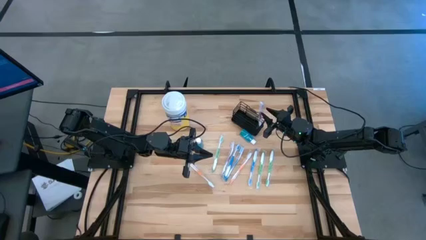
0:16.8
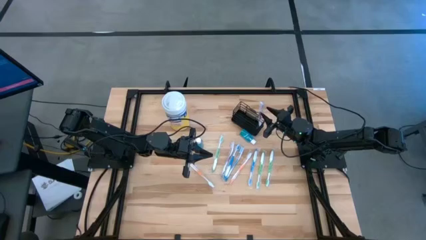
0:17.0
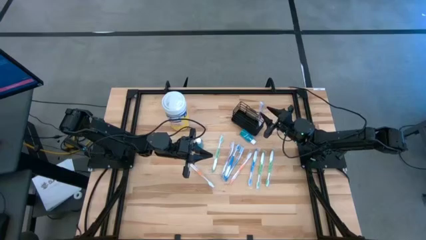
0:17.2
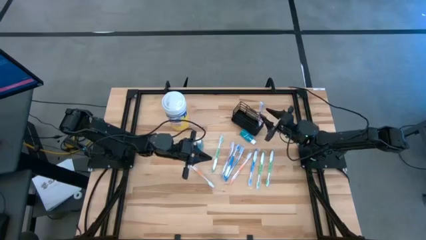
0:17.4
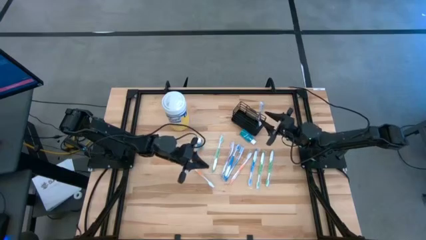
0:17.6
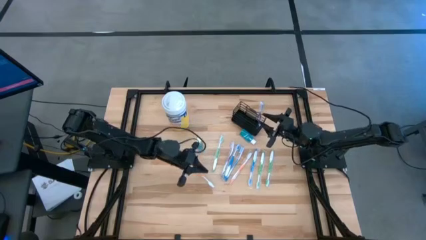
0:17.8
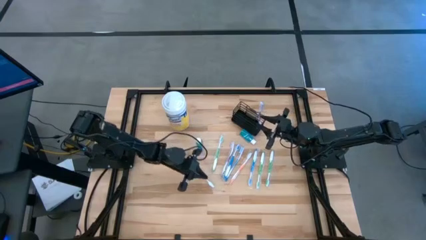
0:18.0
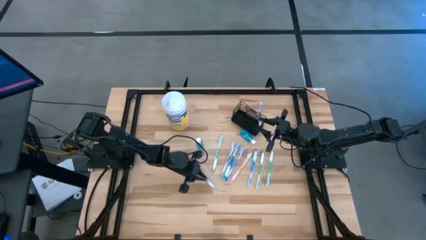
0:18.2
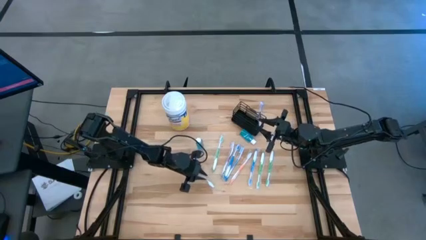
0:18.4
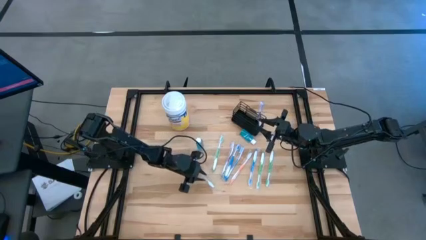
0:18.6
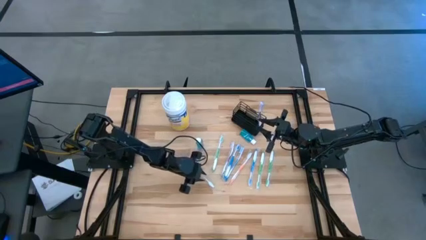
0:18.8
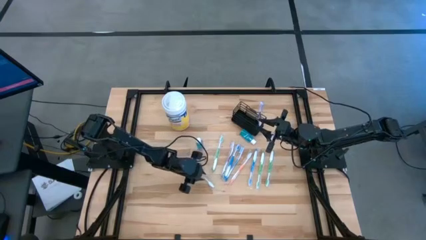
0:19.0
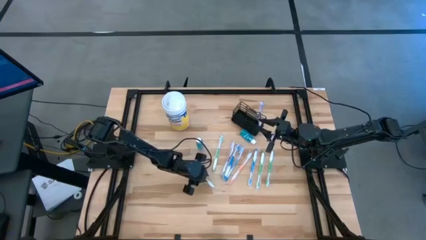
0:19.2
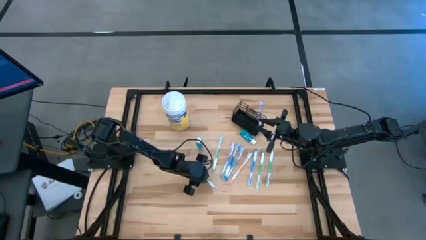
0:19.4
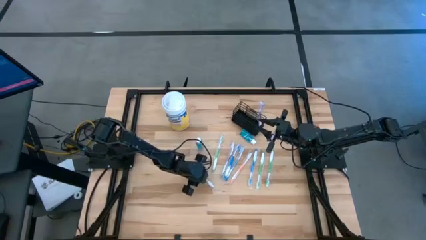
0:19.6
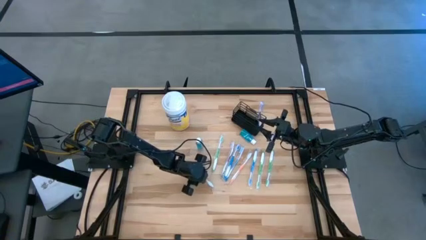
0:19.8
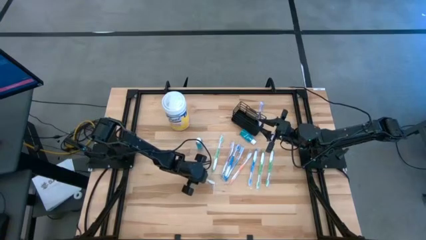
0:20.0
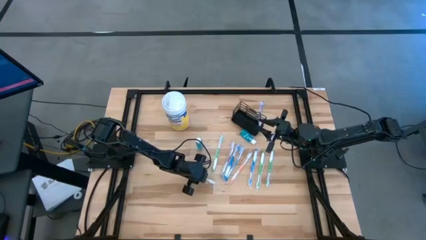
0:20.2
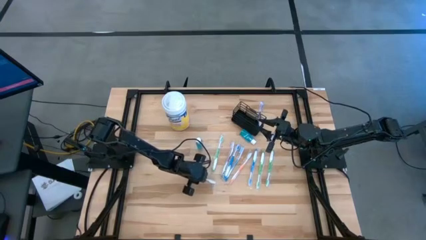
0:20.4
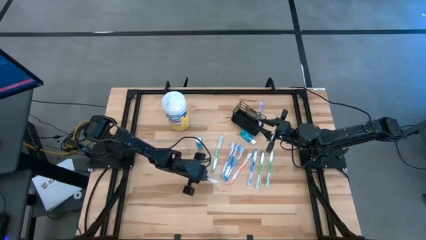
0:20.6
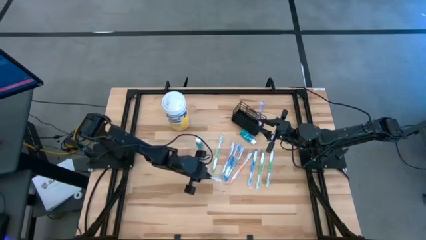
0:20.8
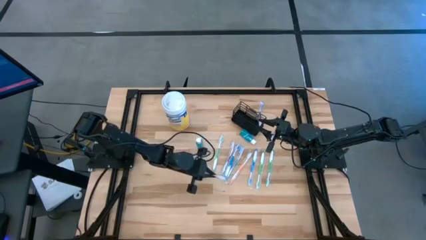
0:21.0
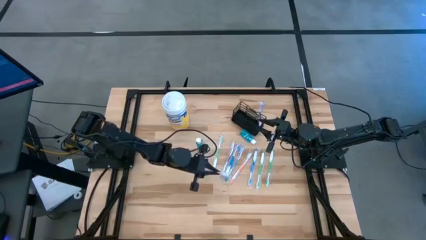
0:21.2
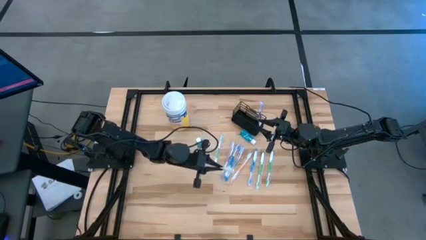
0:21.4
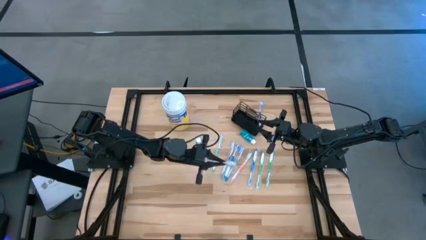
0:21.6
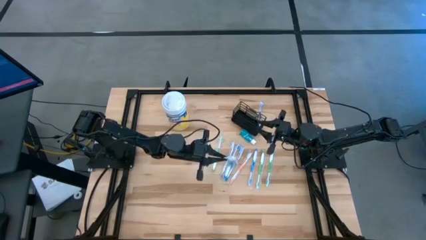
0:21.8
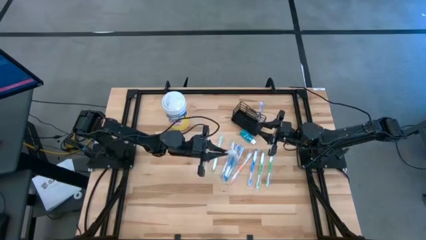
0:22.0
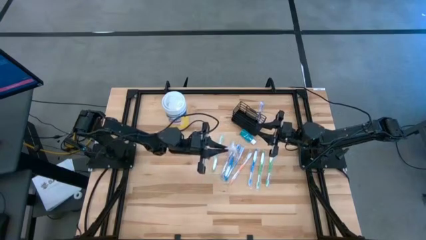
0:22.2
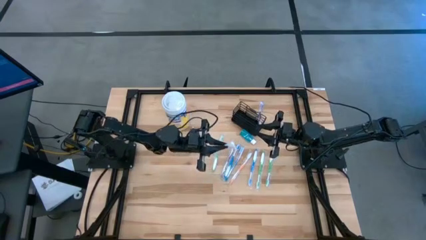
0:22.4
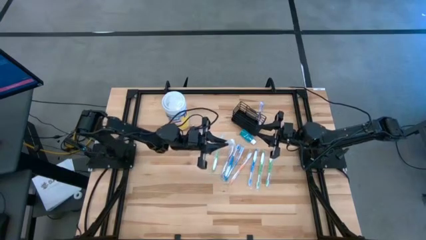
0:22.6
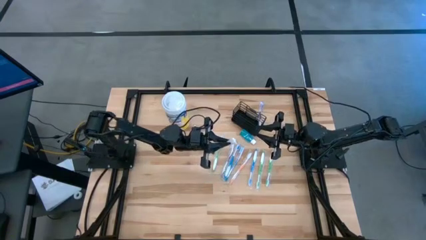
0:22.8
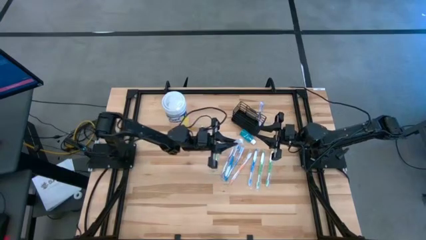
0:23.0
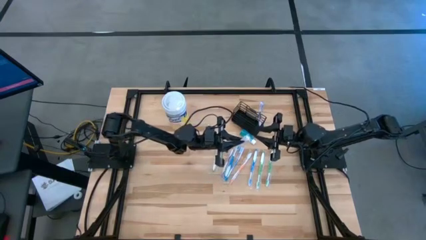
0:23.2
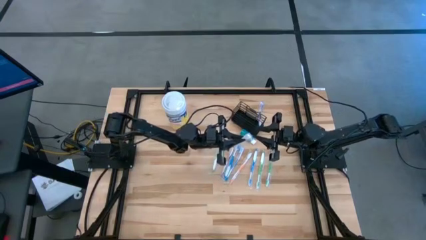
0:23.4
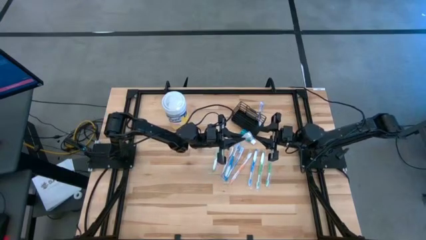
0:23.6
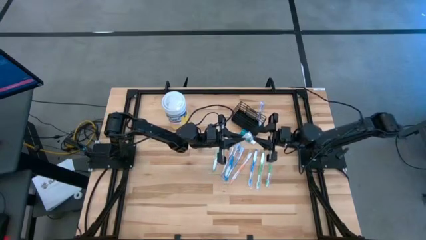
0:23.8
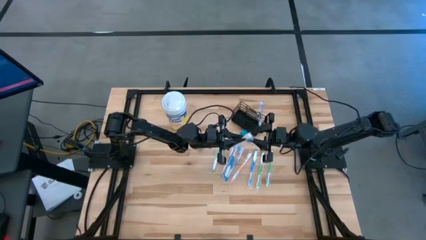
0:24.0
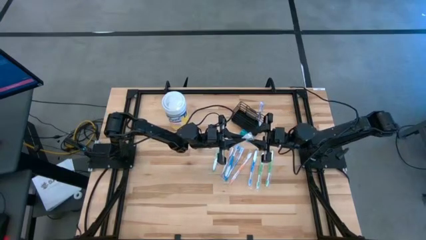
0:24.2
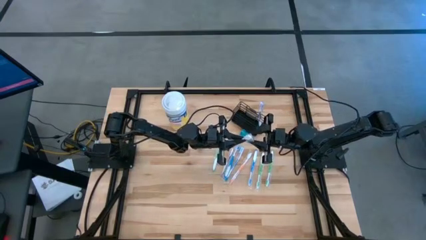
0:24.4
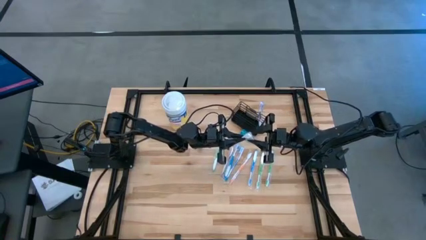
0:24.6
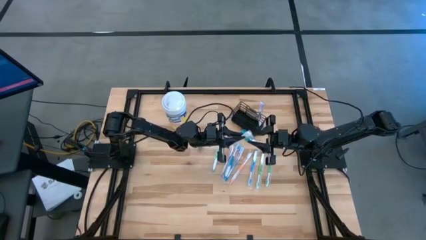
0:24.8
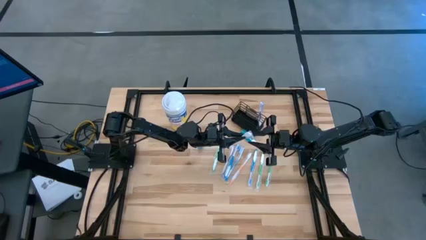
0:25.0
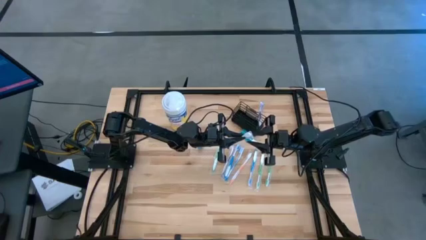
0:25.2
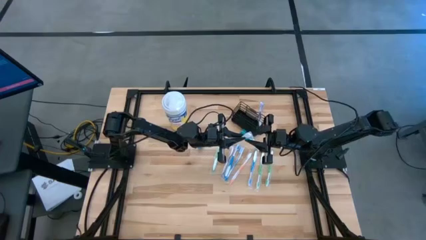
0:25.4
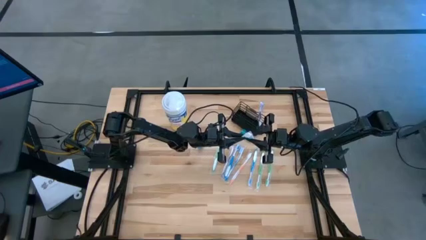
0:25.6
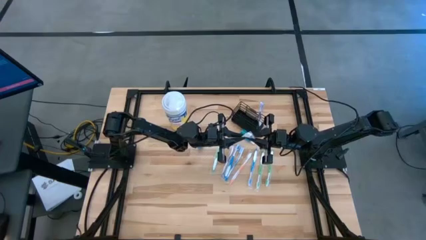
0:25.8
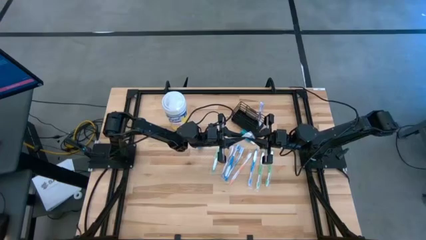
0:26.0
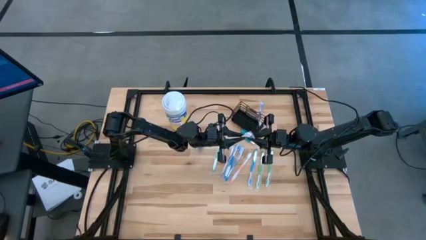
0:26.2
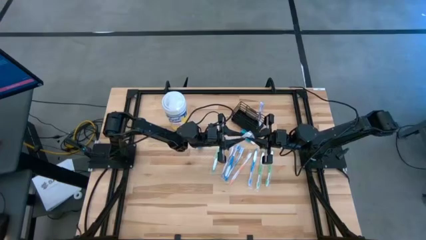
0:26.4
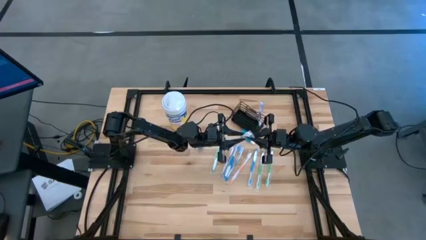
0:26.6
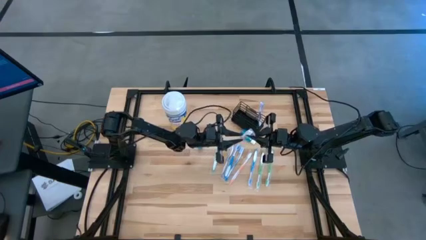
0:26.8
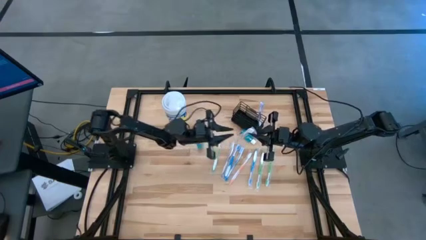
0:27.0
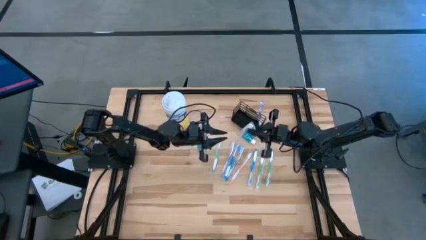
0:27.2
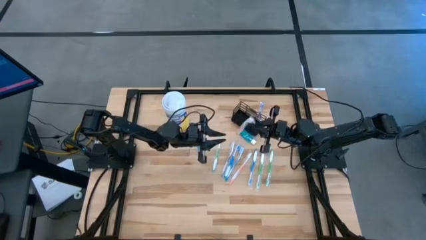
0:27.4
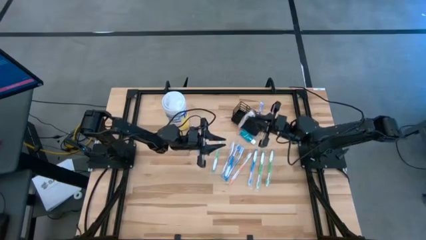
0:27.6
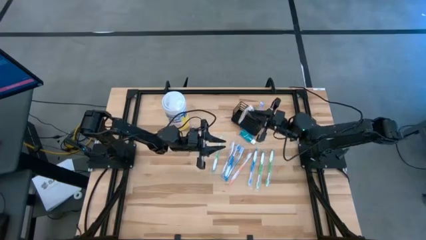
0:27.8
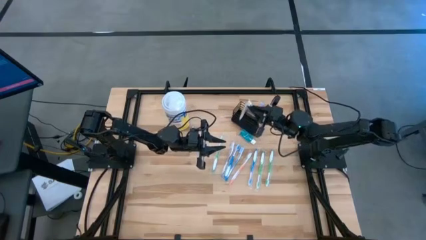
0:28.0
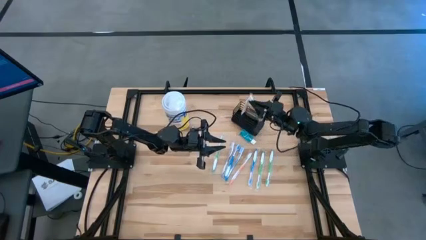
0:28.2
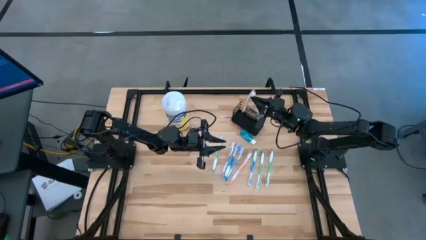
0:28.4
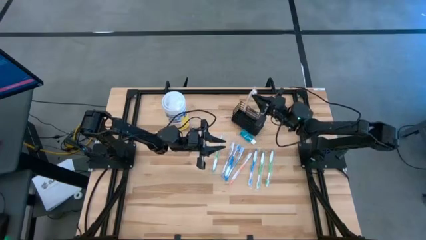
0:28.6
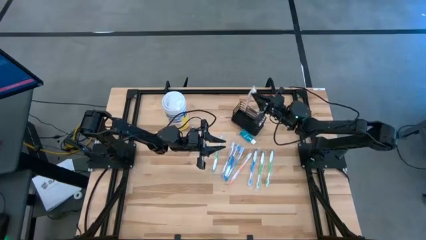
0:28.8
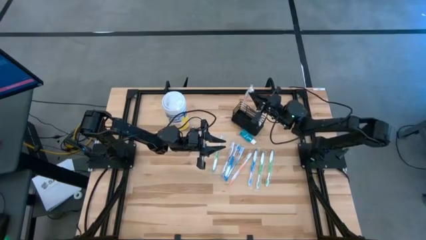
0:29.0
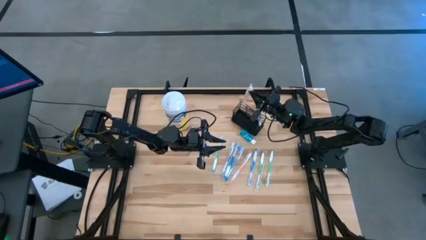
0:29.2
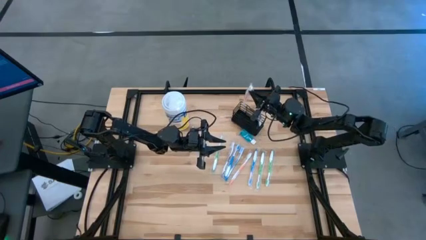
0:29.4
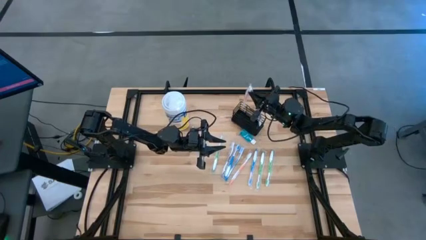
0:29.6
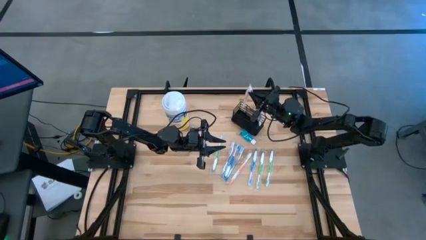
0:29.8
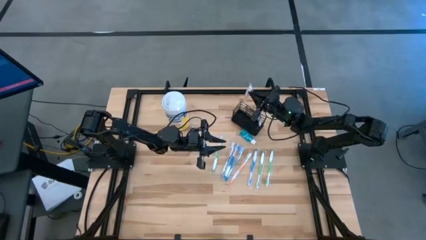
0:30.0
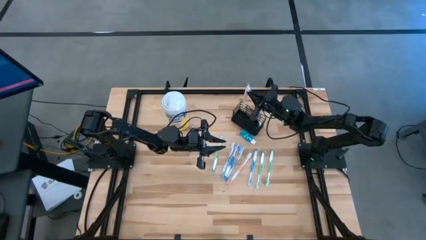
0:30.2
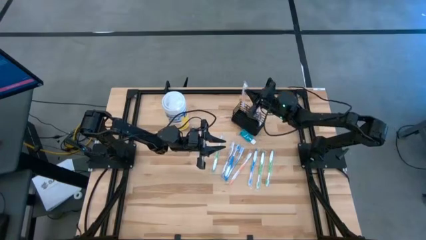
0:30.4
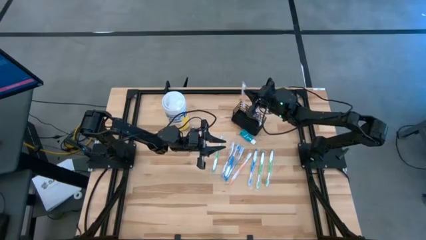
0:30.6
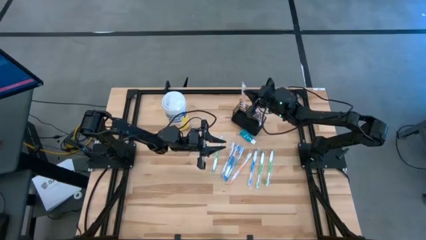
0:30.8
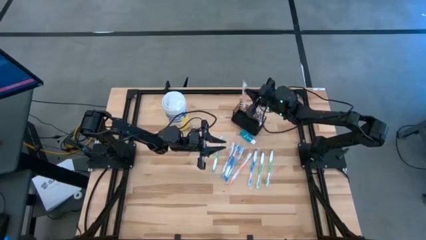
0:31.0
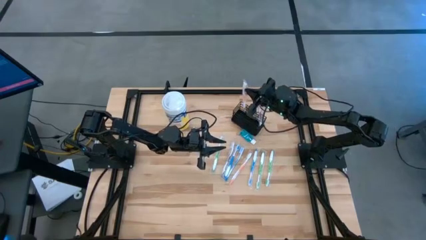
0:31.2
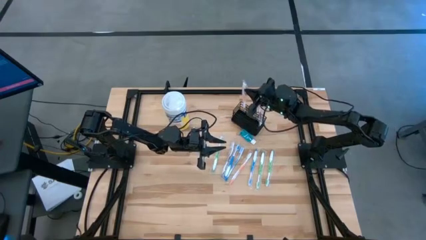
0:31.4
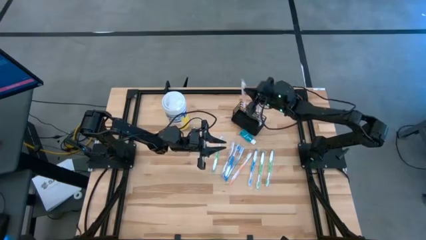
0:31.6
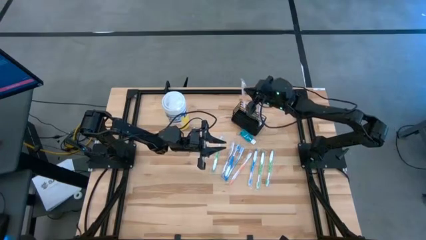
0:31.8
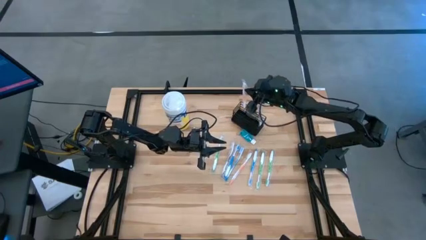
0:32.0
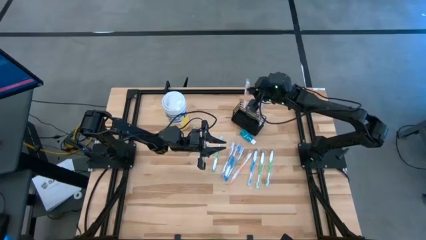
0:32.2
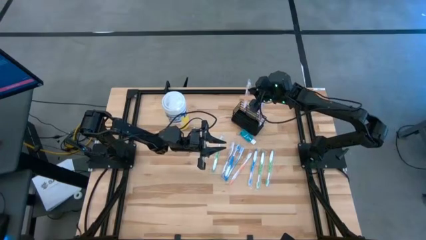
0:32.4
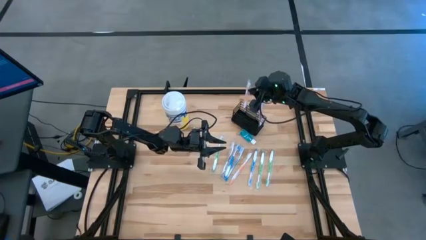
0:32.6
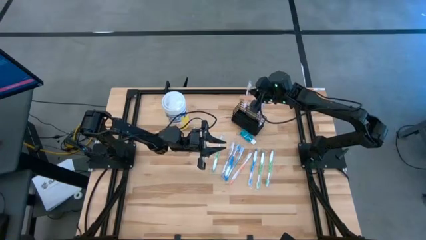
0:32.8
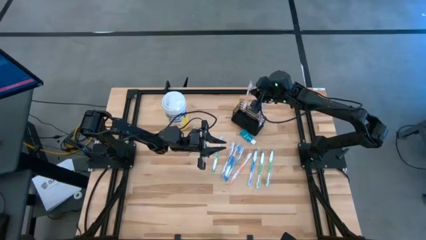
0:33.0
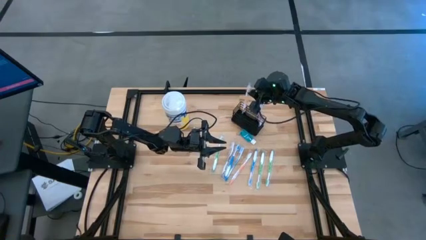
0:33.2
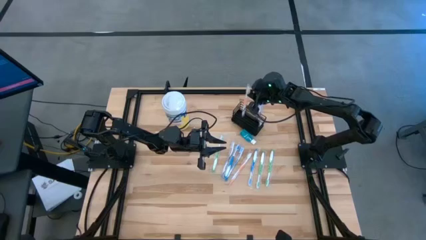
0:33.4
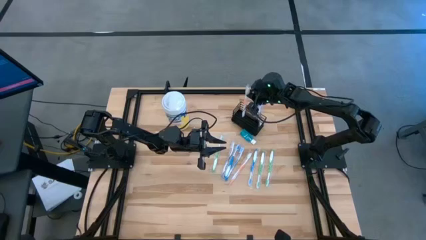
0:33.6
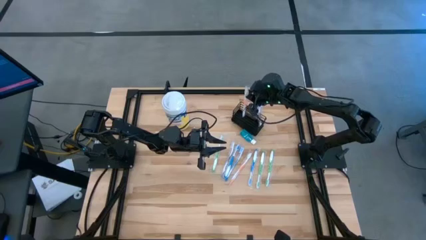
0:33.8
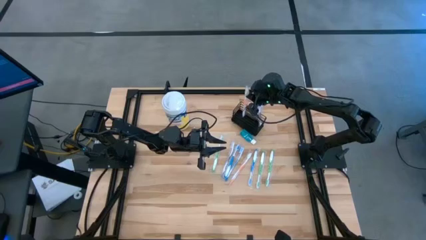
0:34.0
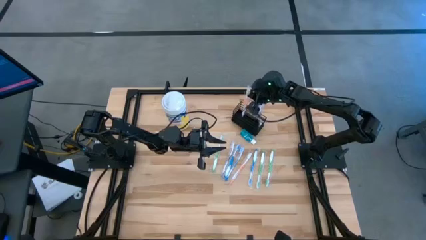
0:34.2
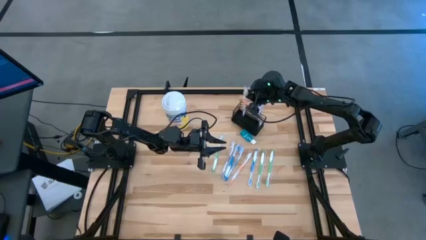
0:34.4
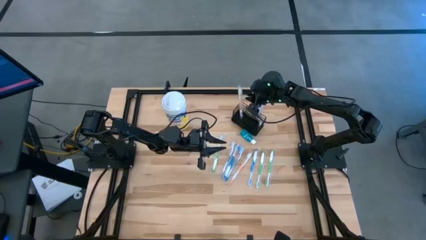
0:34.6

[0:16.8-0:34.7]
Task: Pick & Place toothbrushing station
Put the left orange toothbrush into the black wire organizer
